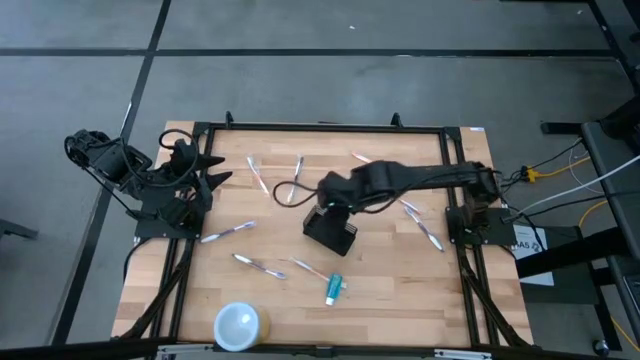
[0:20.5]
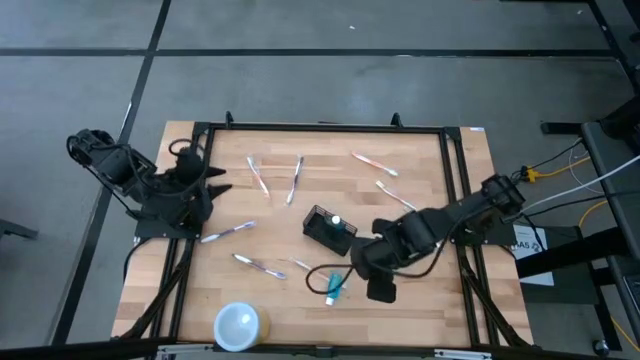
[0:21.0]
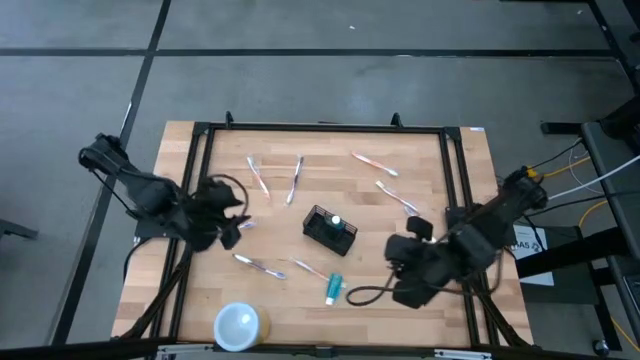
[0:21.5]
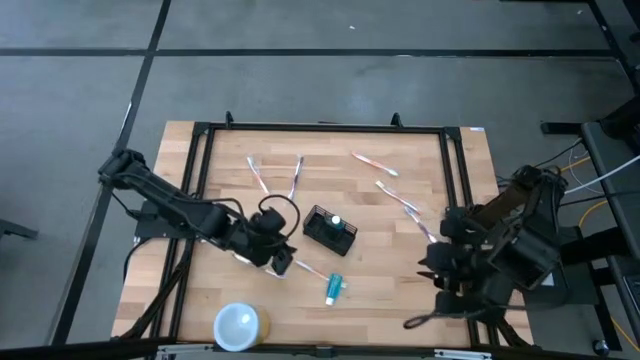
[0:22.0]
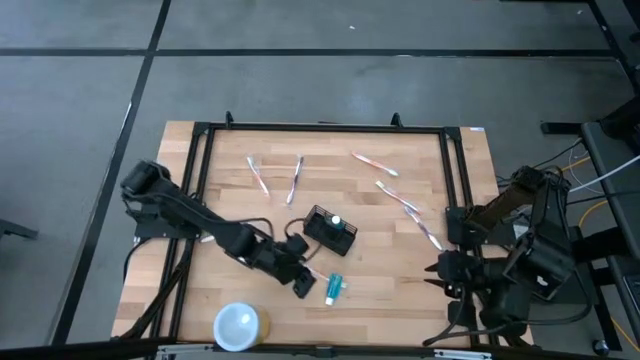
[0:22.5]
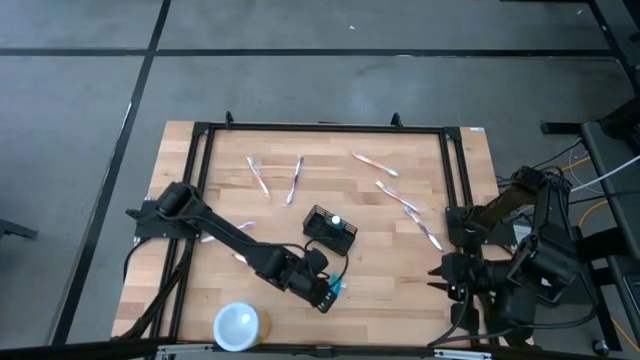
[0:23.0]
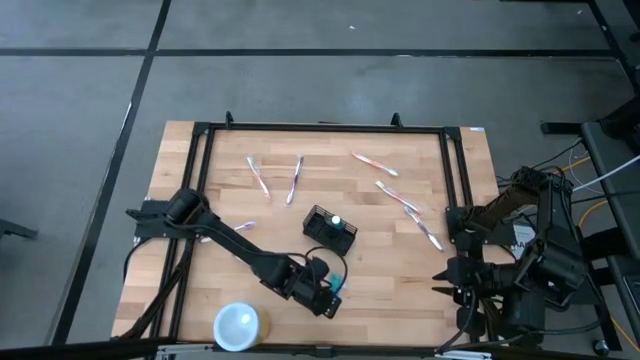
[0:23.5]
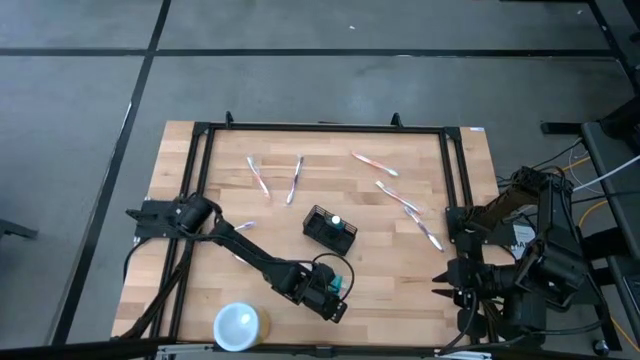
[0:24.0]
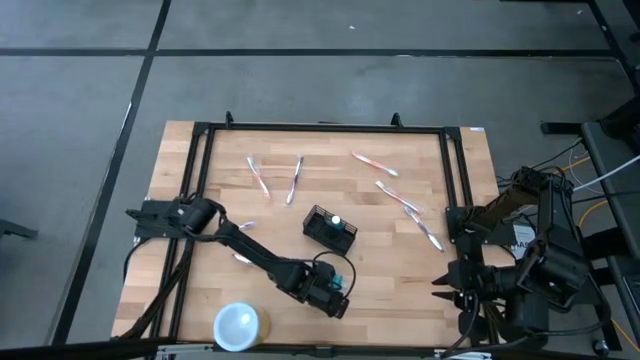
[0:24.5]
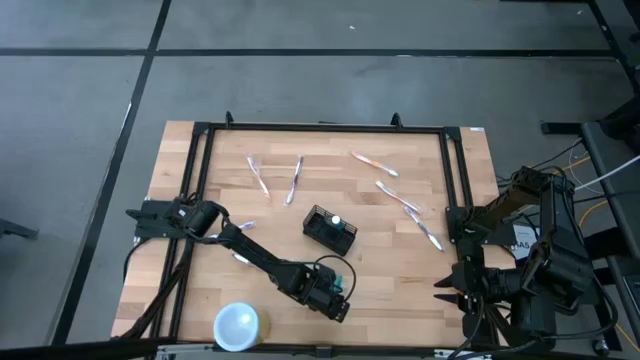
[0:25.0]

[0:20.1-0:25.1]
Task: Pick & Place toothbrushing station
Put the blue mouthwash into the wire organizer

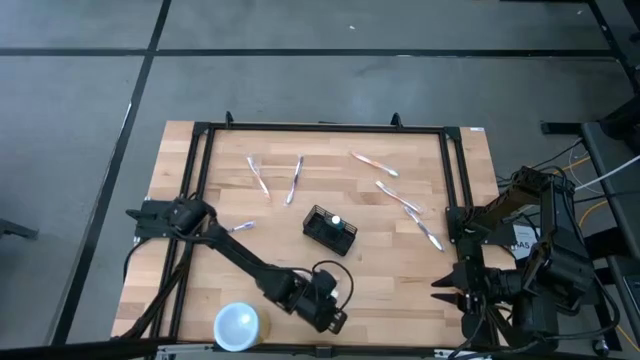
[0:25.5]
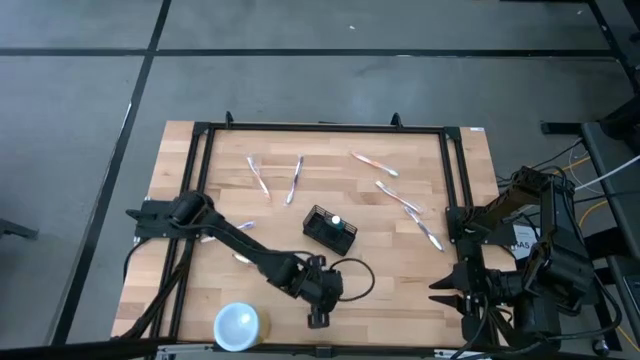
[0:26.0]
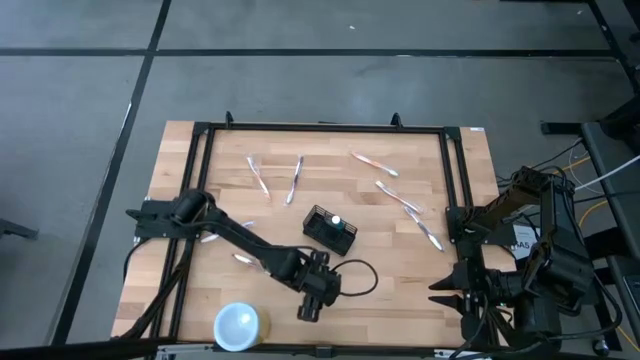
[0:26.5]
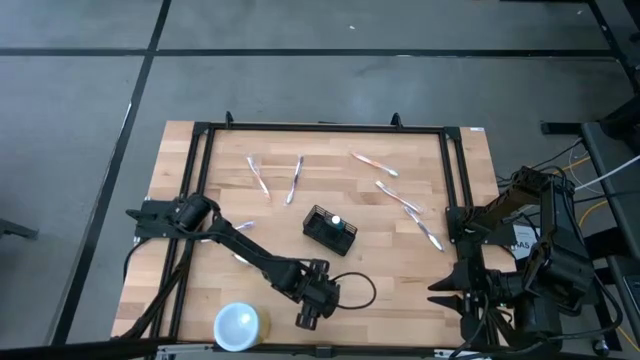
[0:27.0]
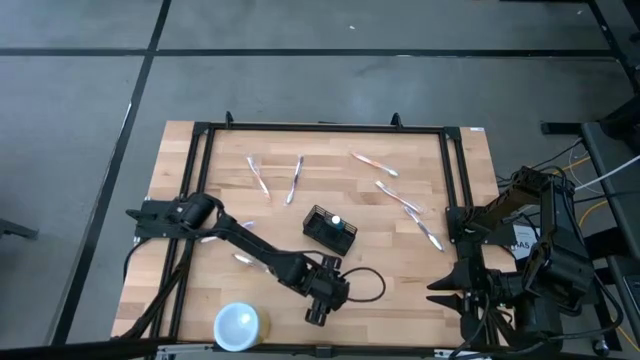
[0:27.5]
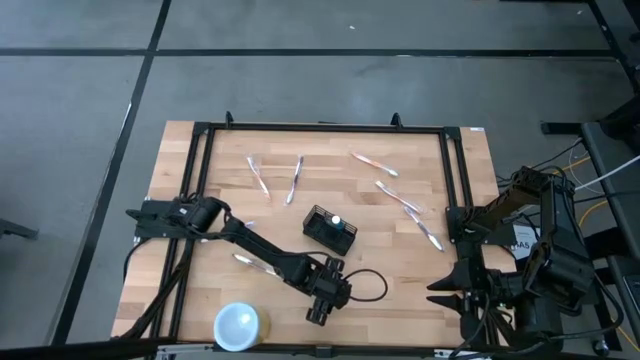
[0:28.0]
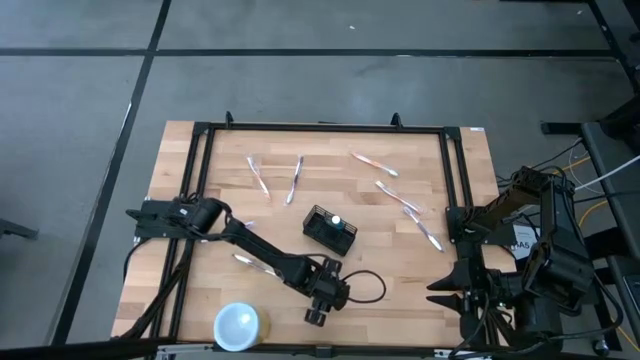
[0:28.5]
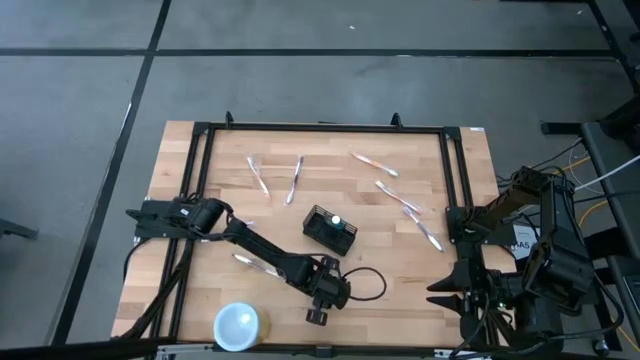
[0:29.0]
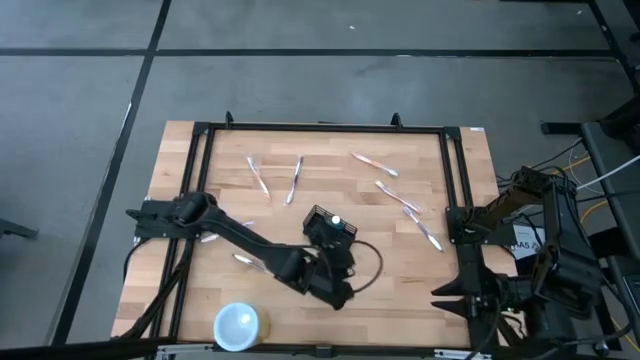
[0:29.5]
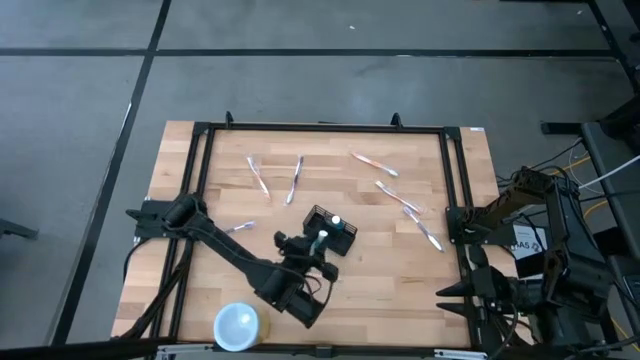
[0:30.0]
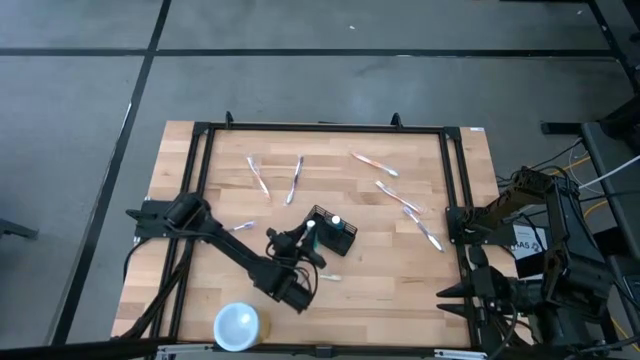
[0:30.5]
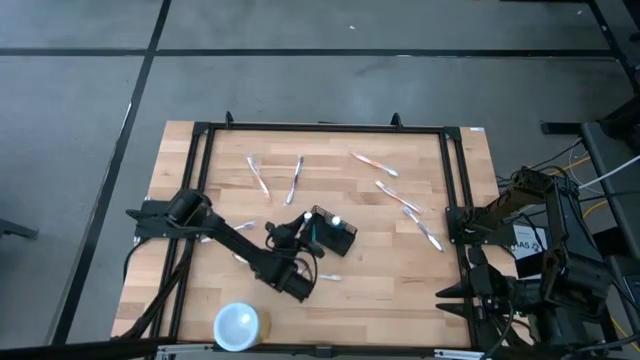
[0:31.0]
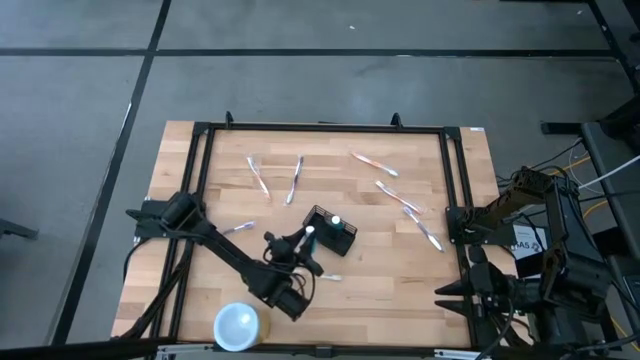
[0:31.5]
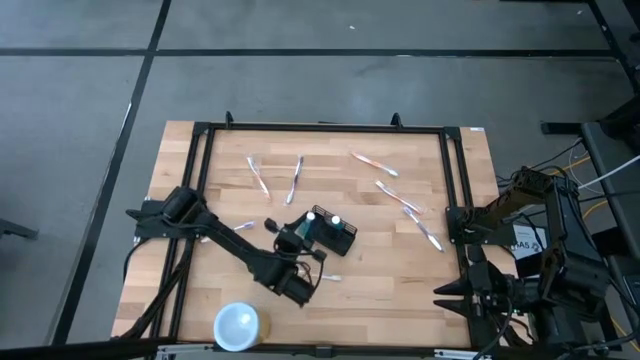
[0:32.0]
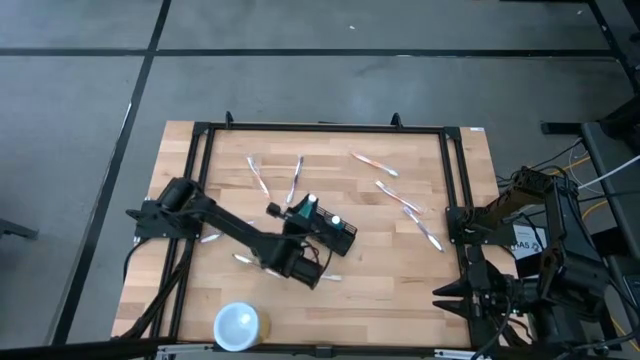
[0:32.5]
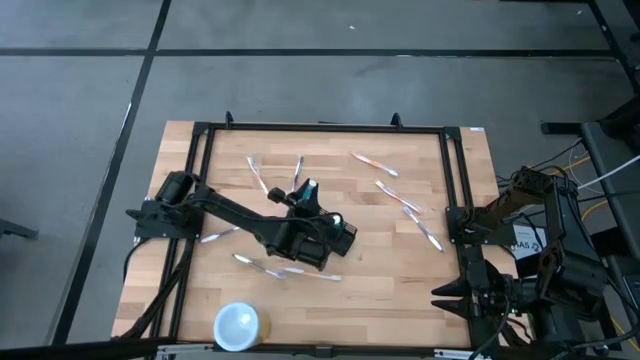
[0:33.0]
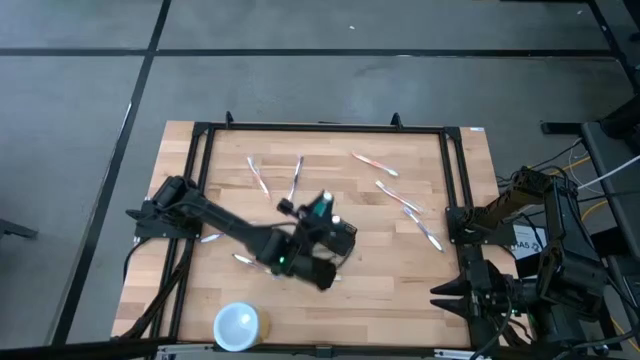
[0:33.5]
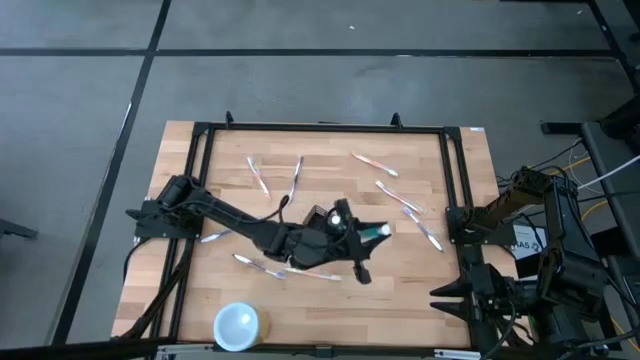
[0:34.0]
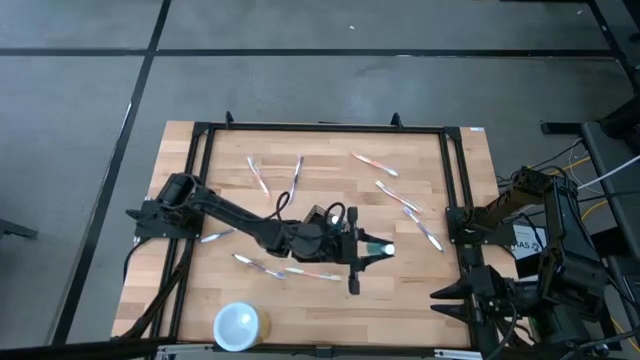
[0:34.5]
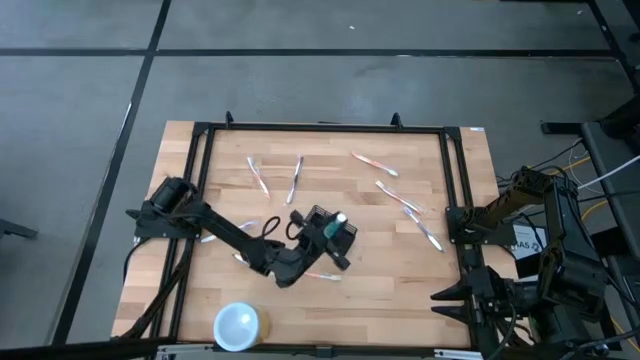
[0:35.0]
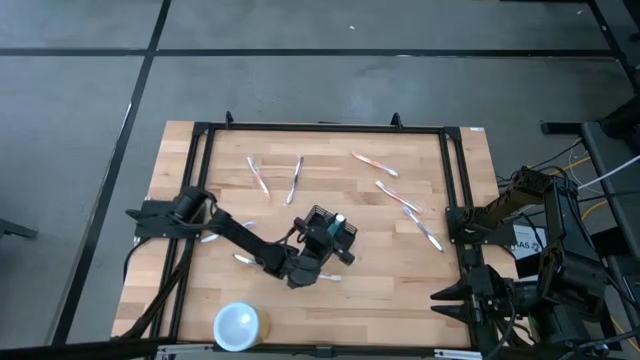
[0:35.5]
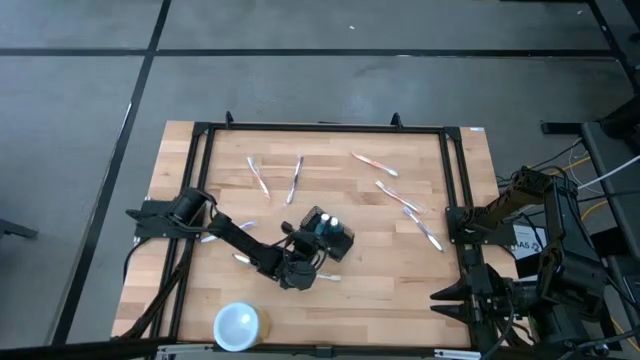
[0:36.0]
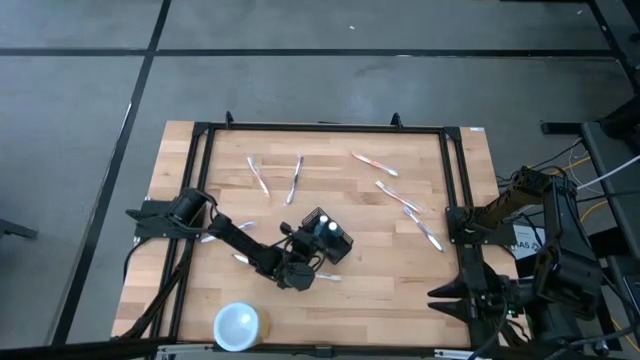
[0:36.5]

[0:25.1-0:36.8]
Put the blue mouthwash into the wire organizer

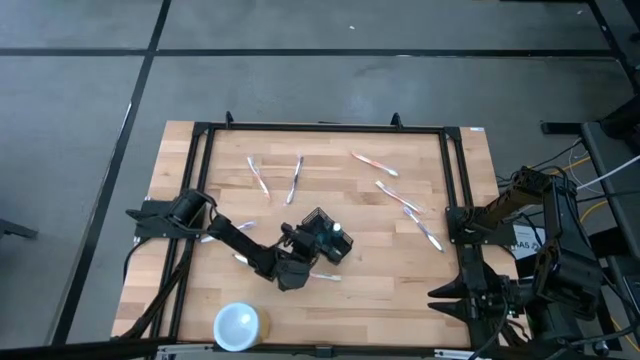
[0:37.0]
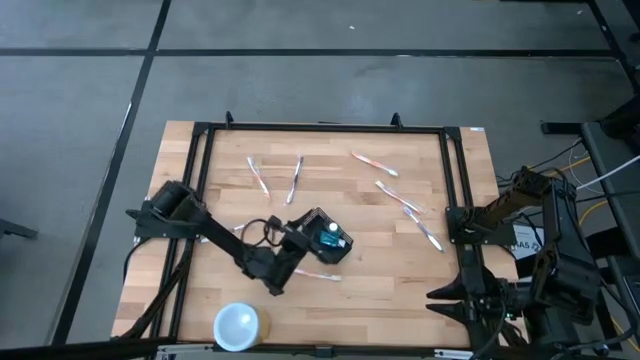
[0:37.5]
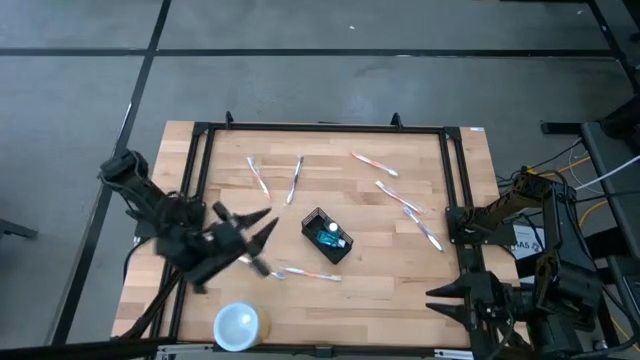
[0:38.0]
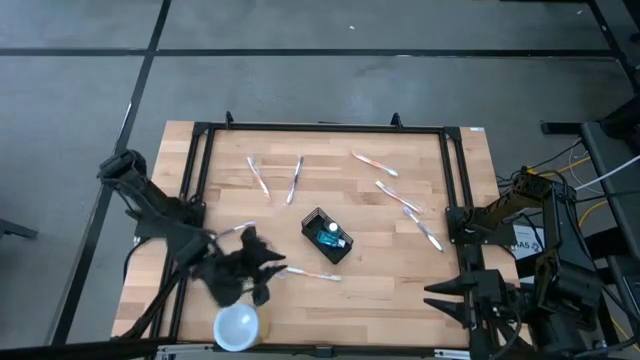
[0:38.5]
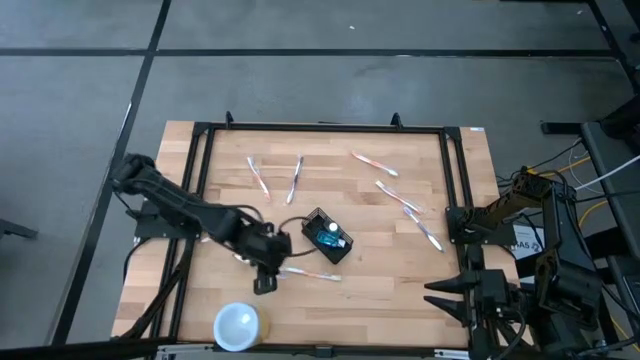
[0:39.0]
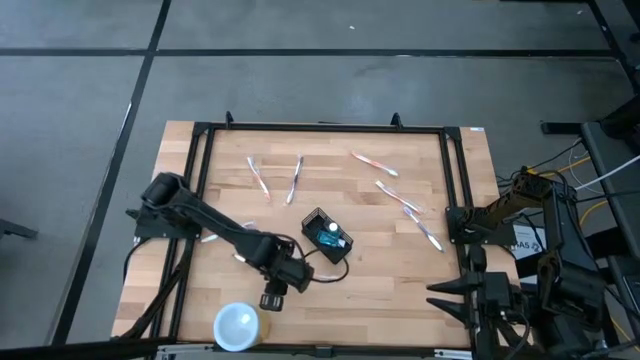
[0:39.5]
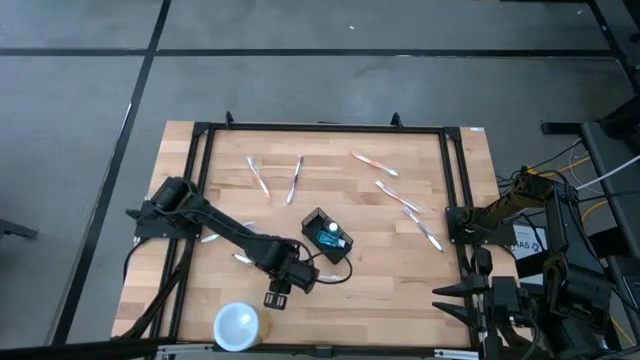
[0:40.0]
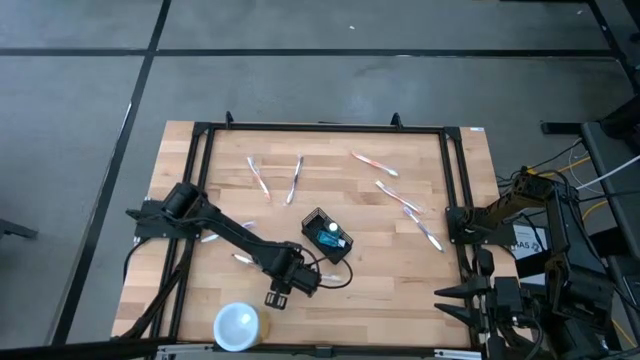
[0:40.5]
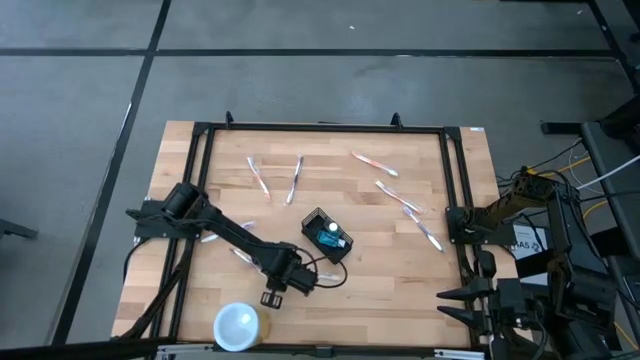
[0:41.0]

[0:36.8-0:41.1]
Put the violet toothbrush into the wire organizer
